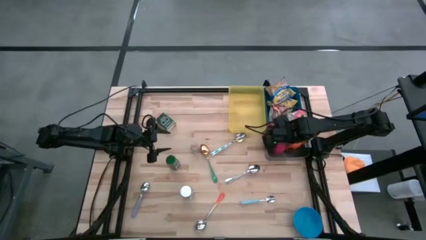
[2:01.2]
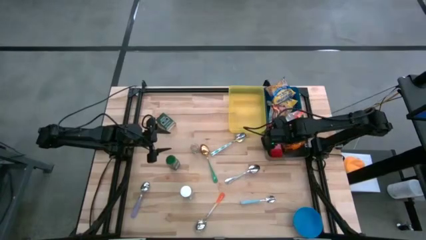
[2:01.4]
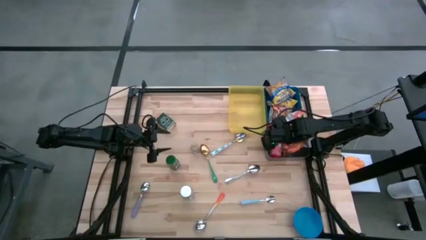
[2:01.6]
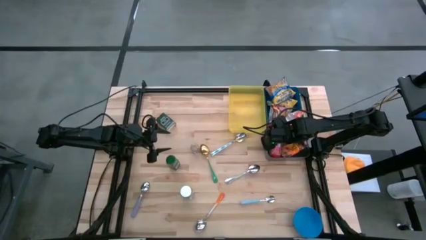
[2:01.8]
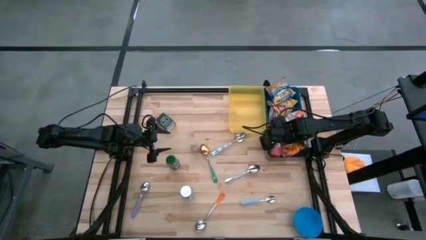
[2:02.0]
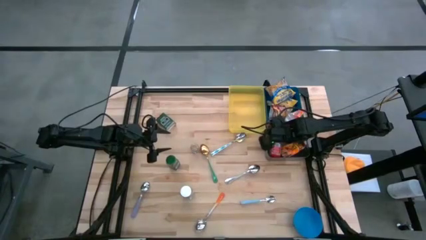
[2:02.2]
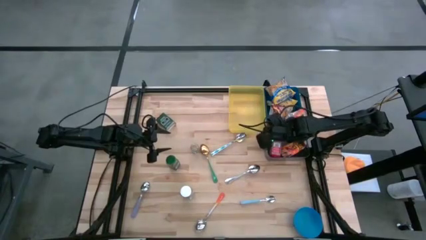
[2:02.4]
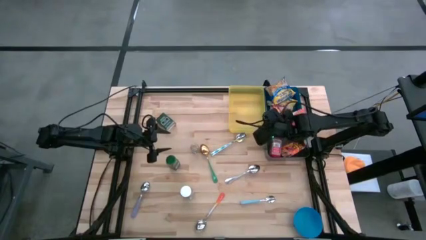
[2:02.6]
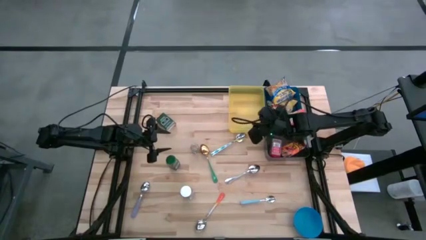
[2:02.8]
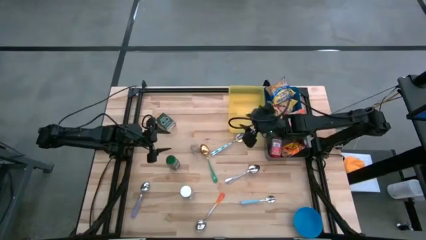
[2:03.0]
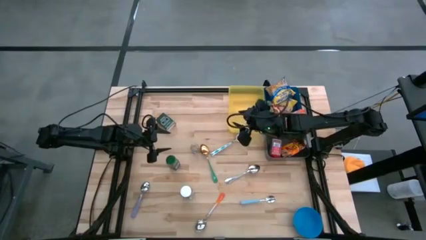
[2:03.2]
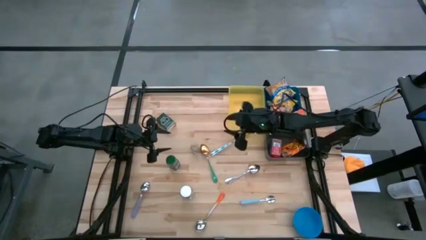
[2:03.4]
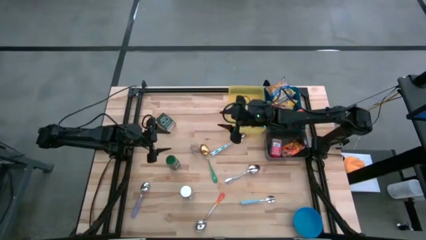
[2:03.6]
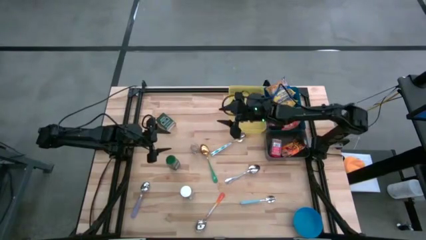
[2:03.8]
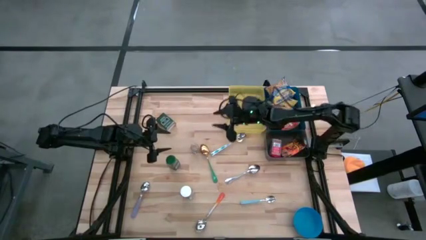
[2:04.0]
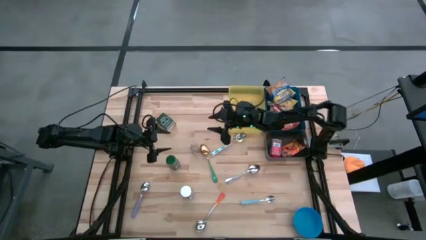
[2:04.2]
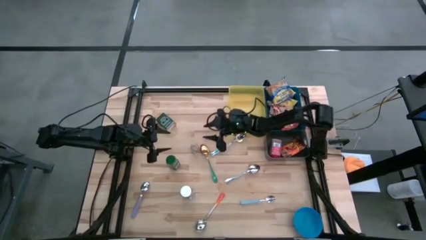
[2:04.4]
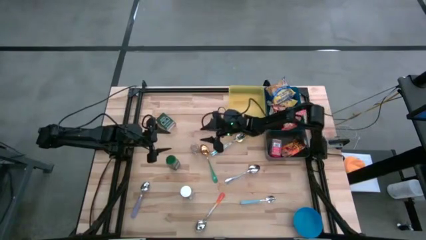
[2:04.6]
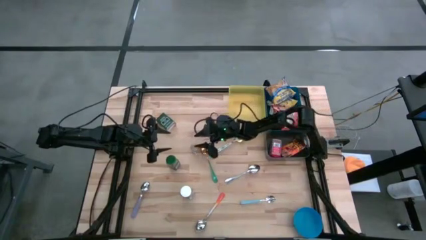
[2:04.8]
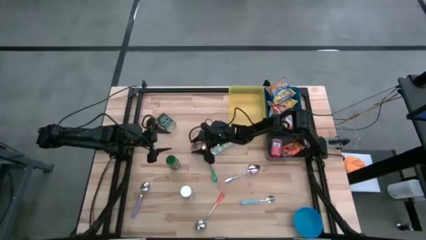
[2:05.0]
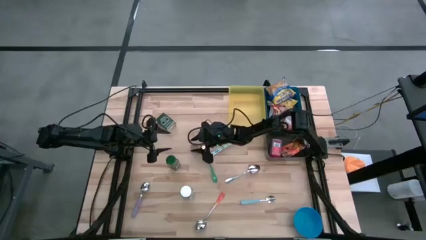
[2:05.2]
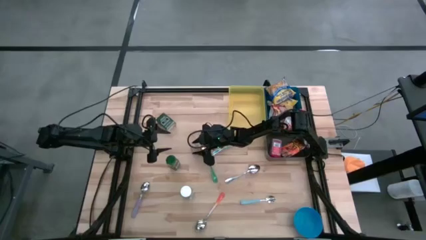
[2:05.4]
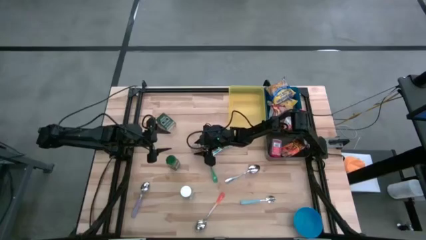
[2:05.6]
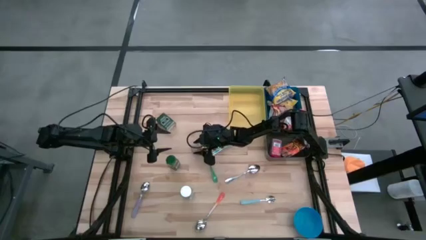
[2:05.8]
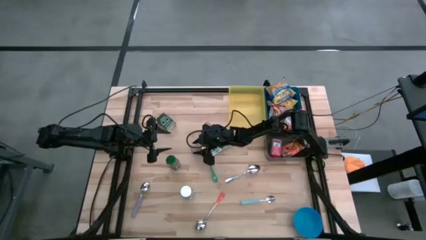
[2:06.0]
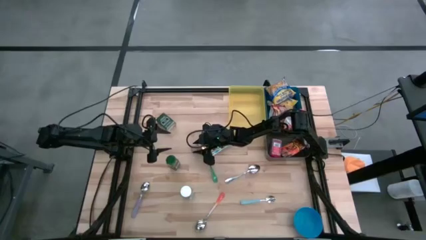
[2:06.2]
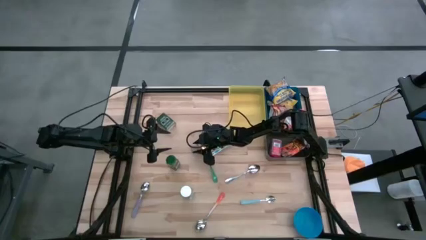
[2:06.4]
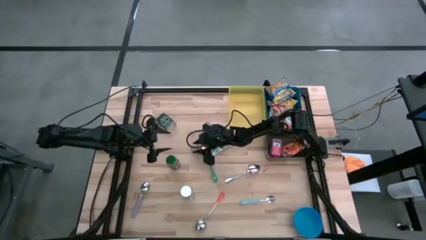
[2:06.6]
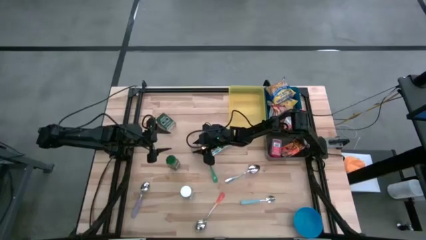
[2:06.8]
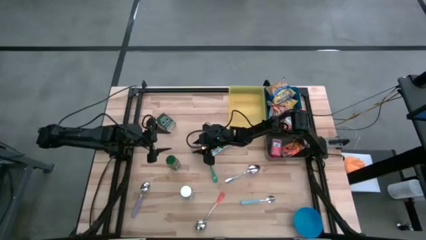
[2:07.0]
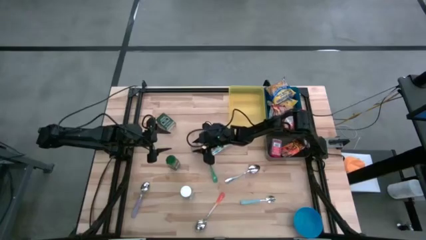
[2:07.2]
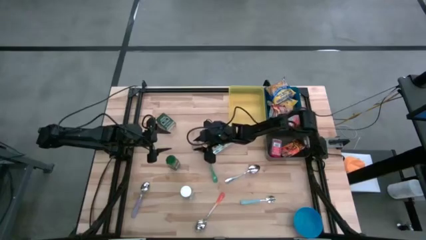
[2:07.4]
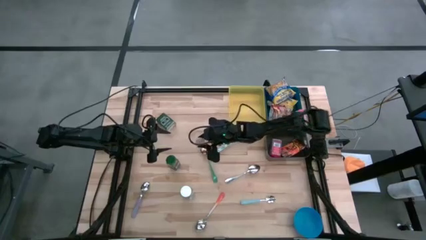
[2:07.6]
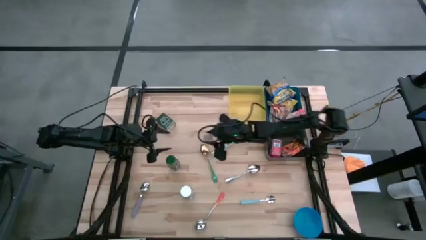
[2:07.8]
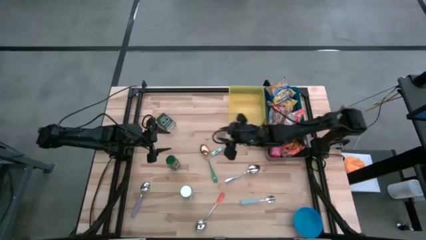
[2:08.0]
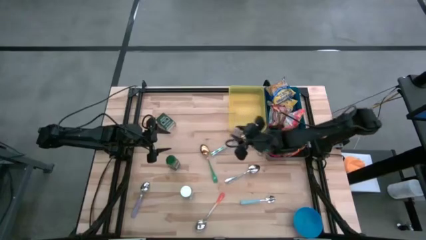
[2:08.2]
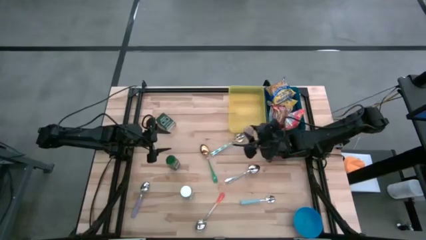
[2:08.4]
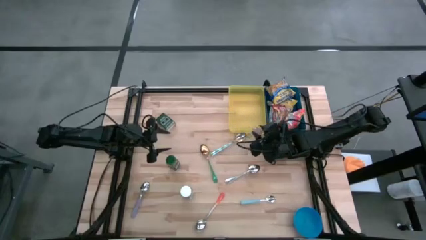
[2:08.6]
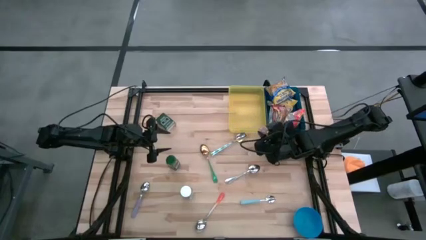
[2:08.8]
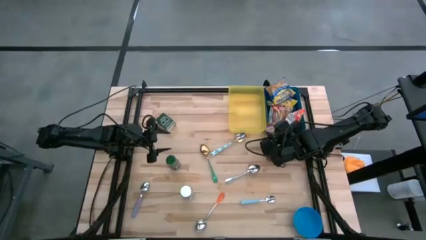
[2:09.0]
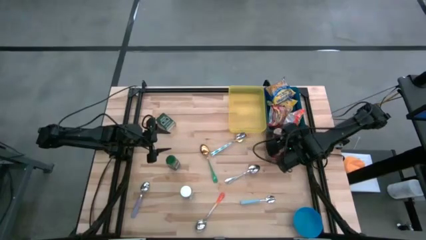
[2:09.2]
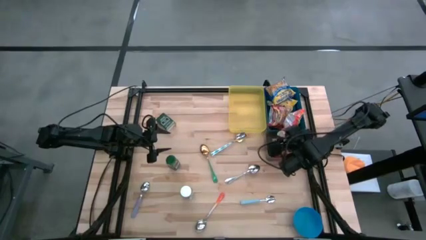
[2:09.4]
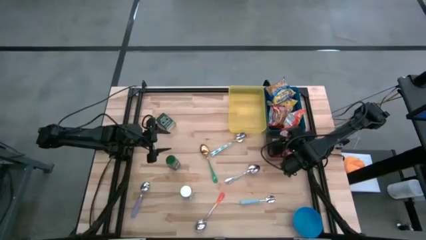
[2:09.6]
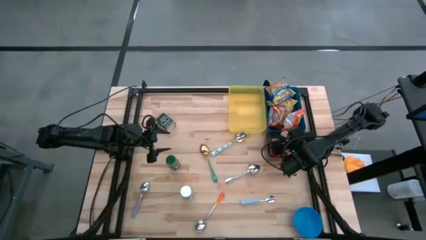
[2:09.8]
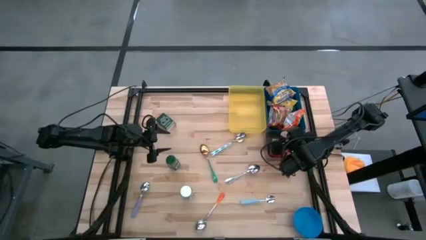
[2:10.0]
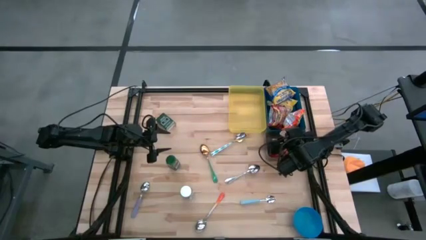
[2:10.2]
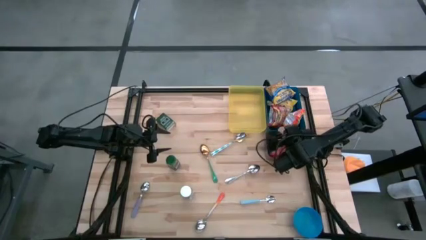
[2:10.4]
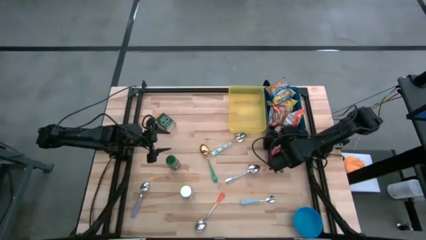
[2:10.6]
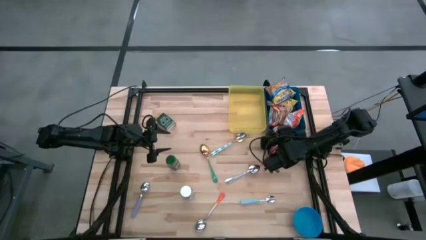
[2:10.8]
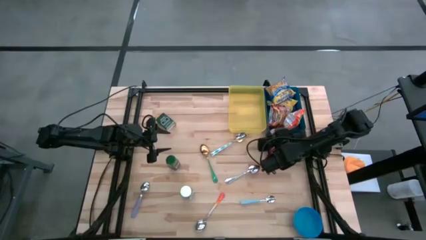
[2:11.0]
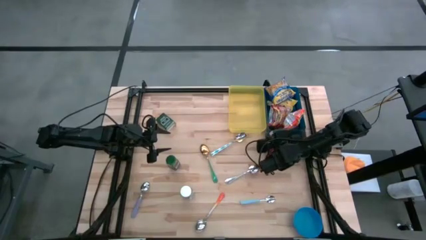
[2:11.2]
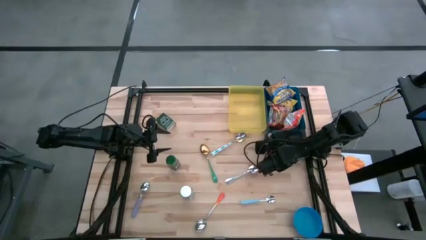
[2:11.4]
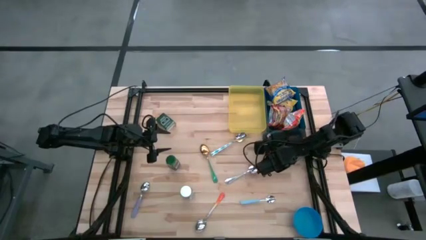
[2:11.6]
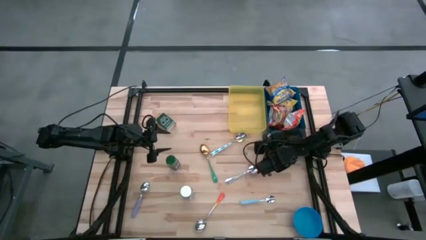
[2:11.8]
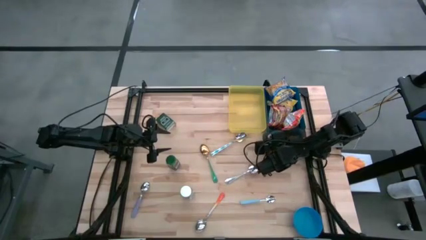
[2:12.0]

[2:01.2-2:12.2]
Put the brown seasoning bottle into the black bin
